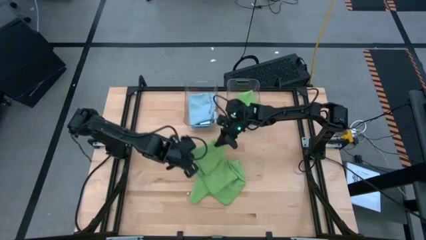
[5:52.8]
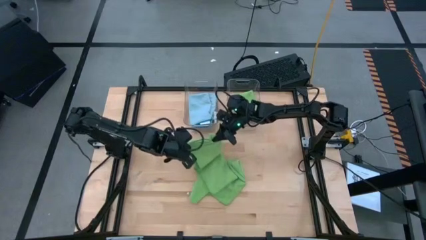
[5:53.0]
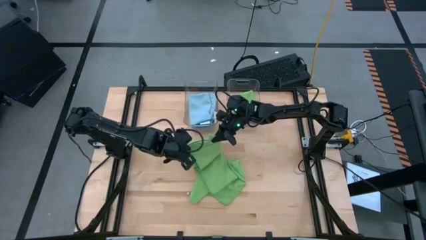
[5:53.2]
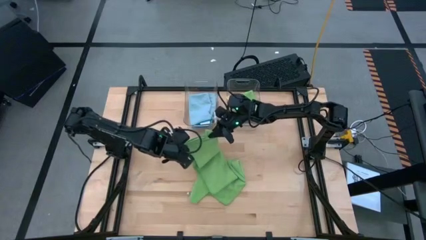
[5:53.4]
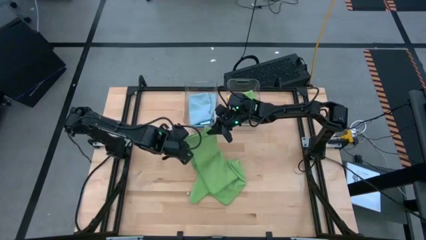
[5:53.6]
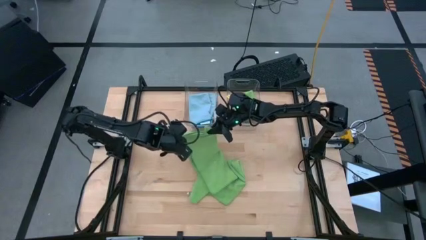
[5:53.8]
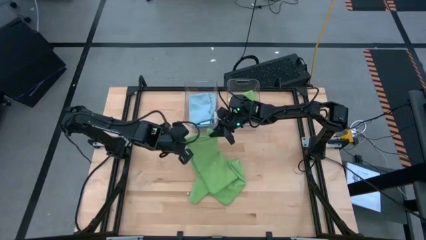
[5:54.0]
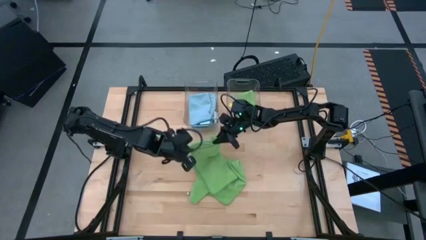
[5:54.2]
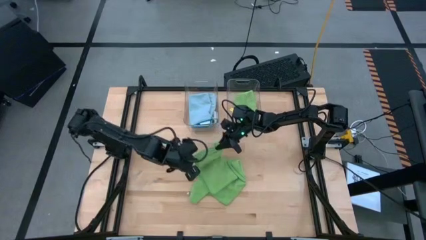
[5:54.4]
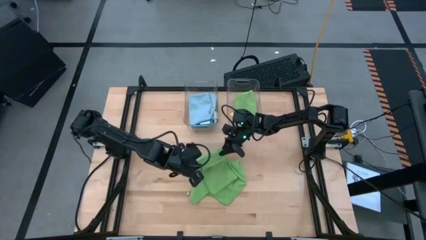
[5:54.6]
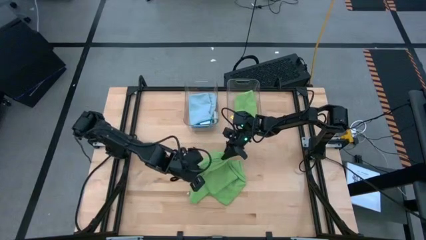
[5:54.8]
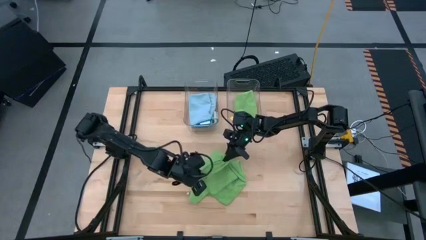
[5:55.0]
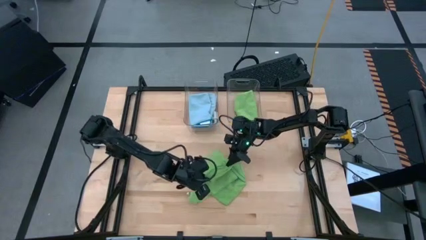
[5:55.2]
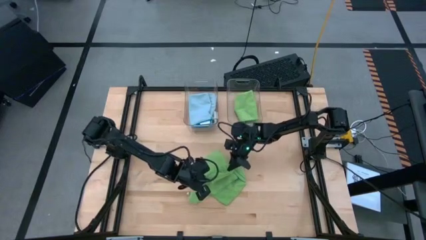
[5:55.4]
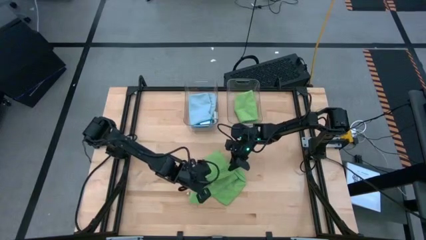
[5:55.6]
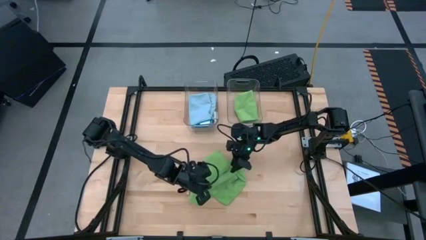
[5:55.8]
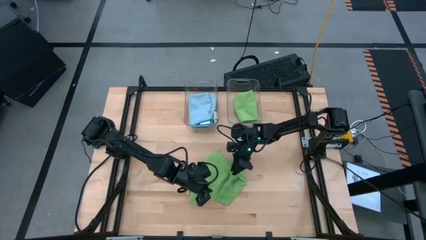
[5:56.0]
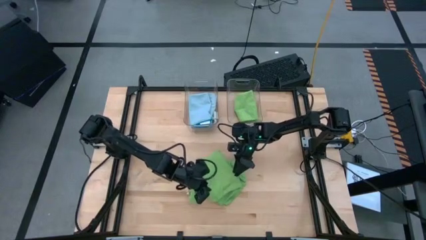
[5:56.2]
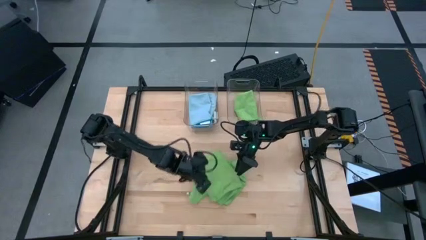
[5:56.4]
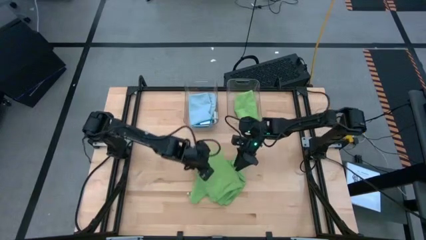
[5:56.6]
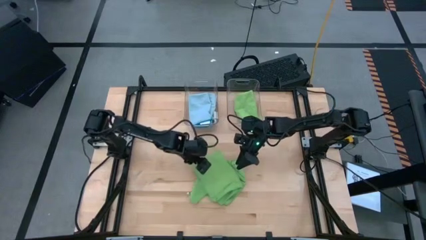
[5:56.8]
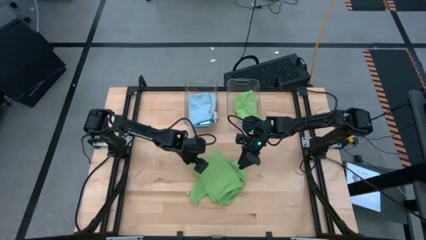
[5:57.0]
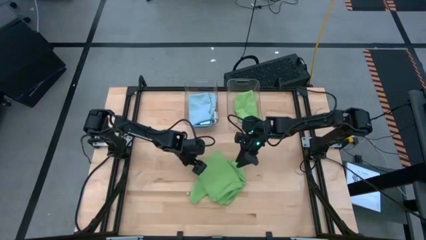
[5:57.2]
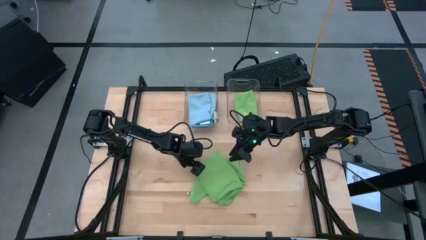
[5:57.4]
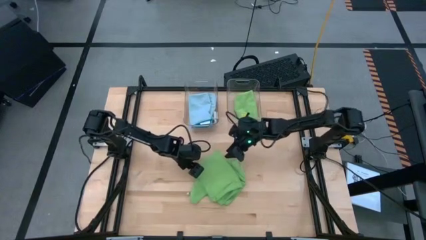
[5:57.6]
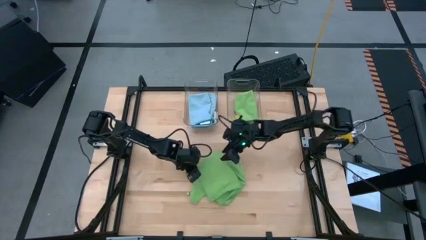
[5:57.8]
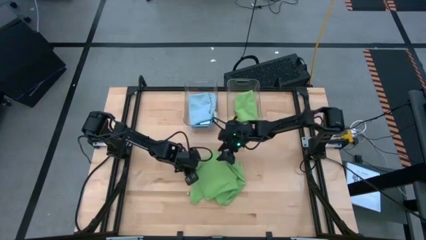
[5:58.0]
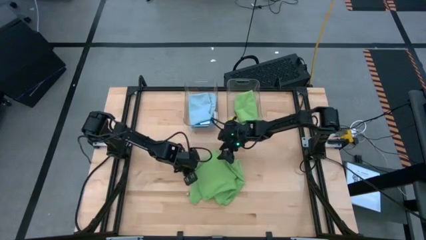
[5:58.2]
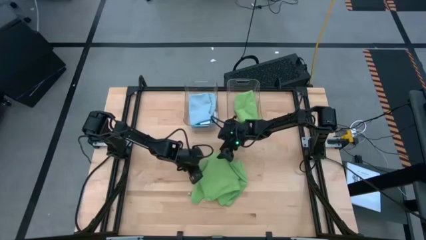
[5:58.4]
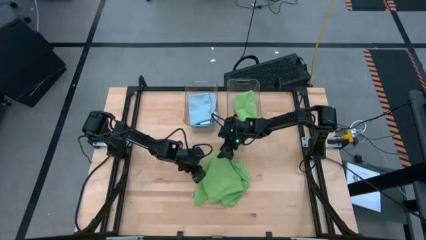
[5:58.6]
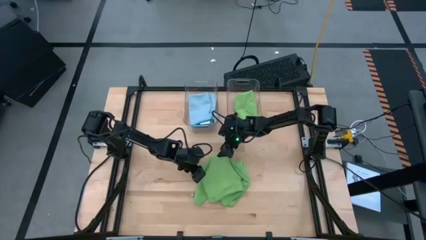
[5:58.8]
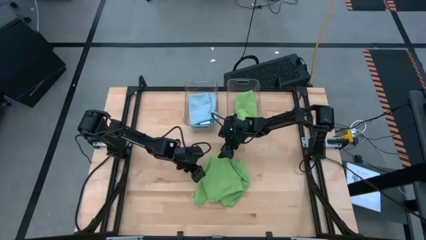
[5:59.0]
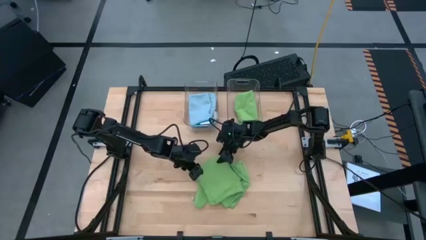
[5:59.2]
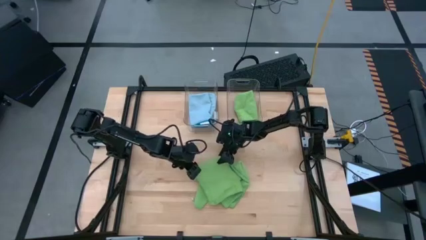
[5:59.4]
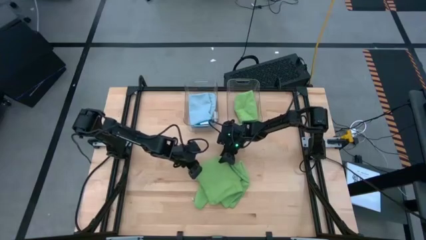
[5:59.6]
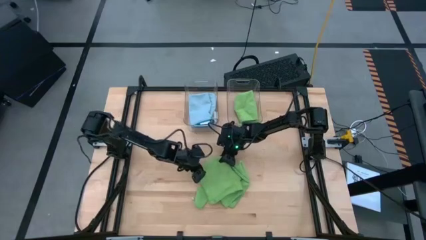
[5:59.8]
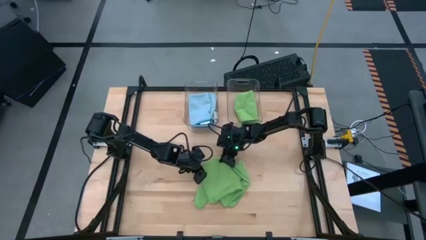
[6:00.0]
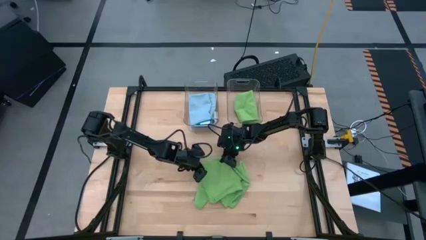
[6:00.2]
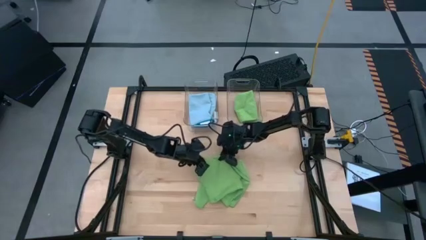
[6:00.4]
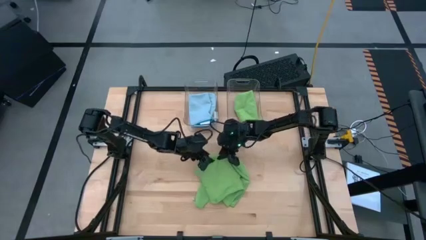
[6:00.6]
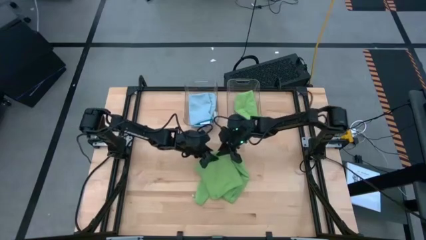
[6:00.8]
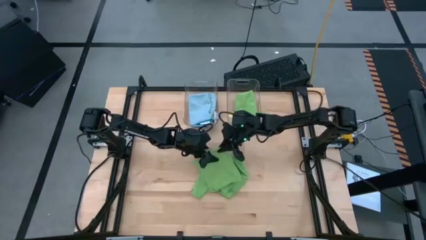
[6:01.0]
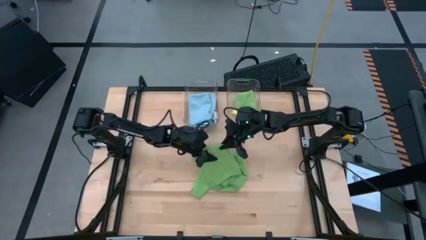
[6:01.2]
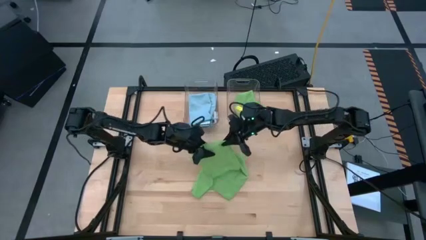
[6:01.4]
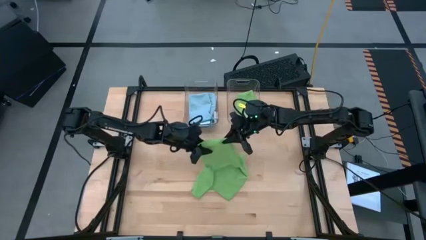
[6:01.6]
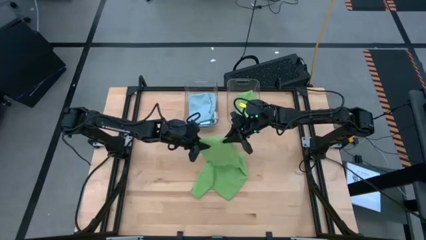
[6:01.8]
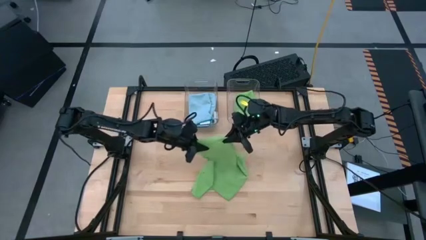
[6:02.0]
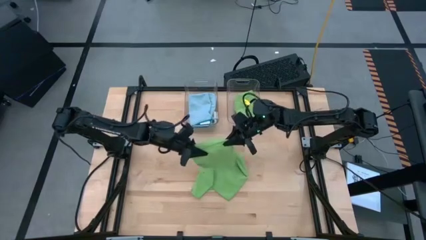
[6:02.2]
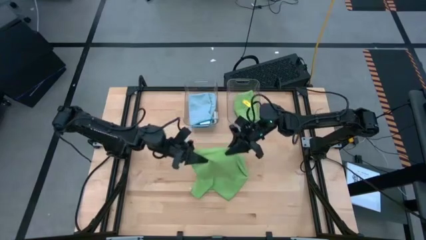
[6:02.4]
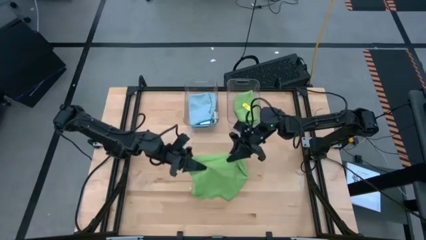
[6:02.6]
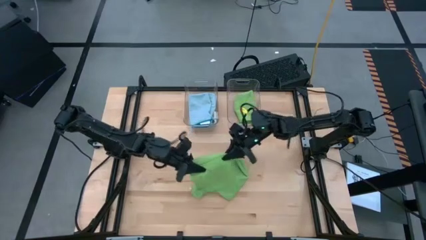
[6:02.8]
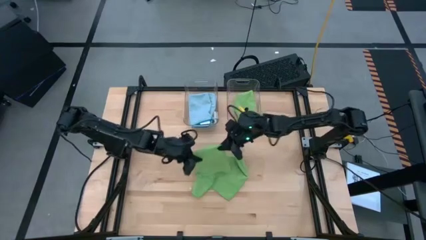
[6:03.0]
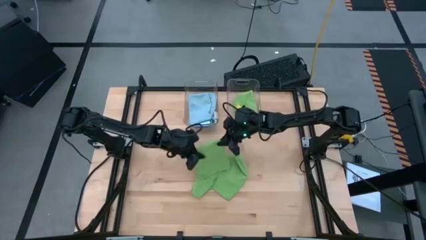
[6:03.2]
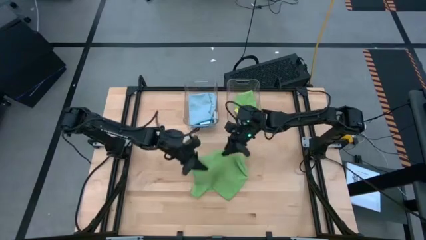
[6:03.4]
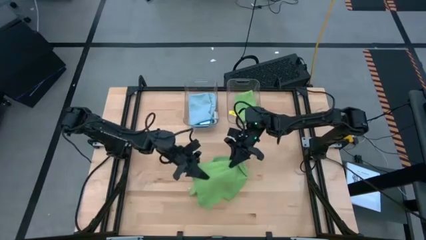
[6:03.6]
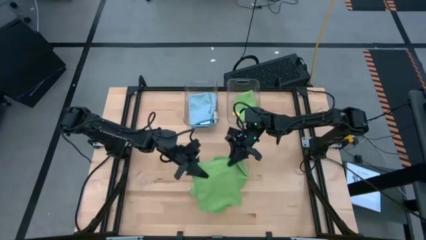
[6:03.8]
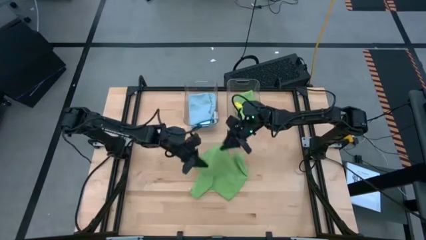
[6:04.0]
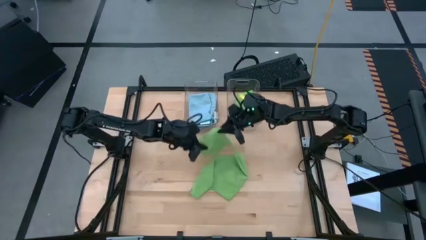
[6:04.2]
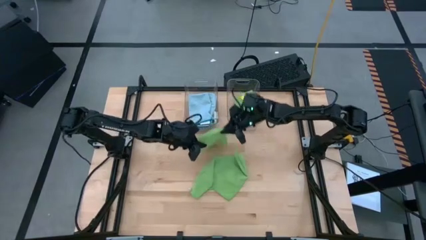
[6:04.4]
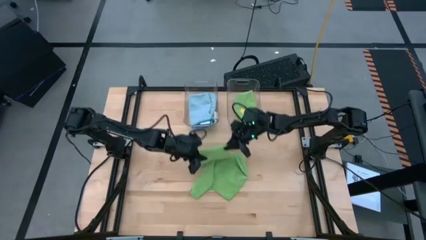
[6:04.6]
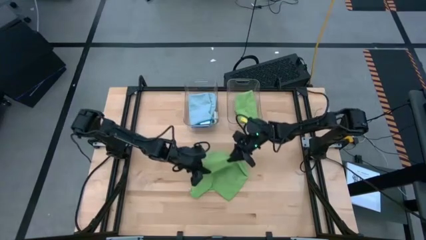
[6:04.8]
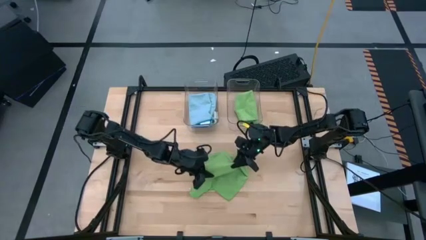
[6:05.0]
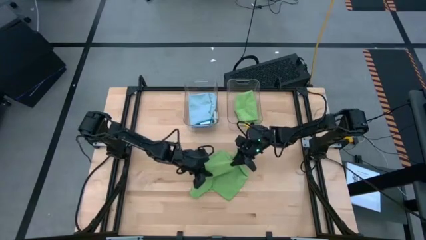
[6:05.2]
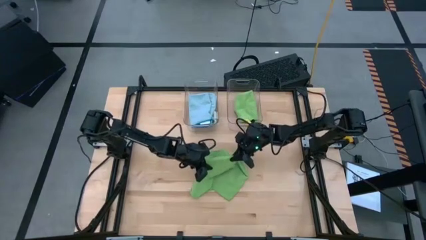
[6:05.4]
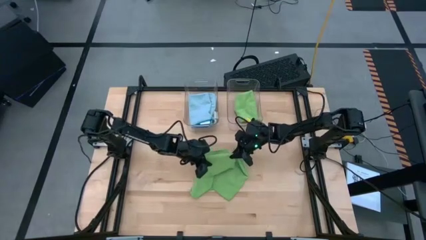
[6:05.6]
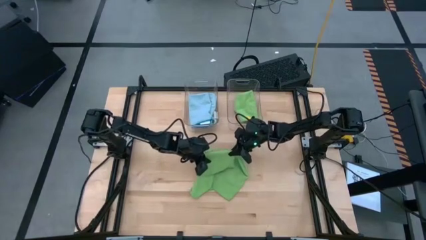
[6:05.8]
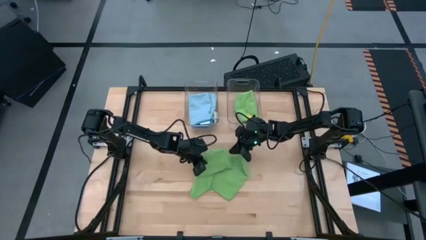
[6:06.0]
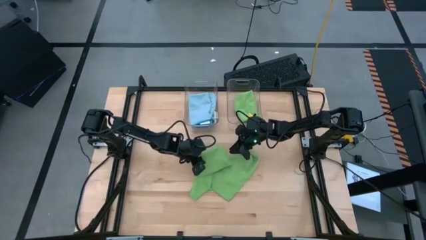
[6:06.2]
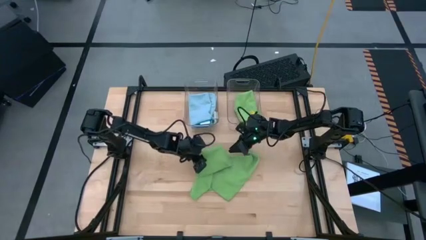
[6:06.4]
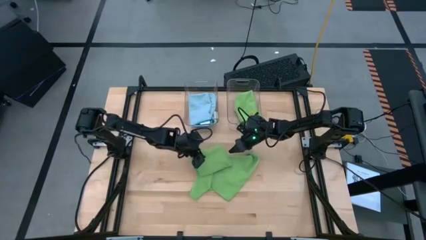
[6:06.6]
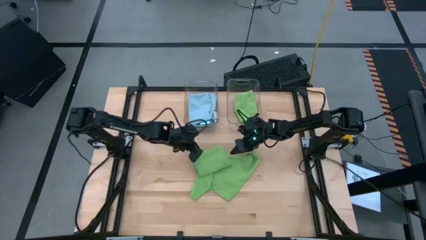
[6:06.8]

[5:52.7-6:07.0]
Task: Fold microfiber towels
Fold the left green microfiber towel
